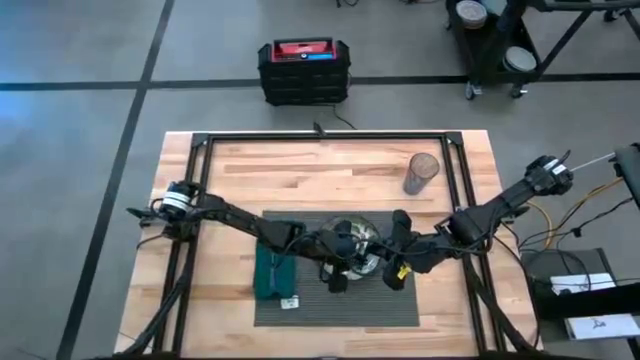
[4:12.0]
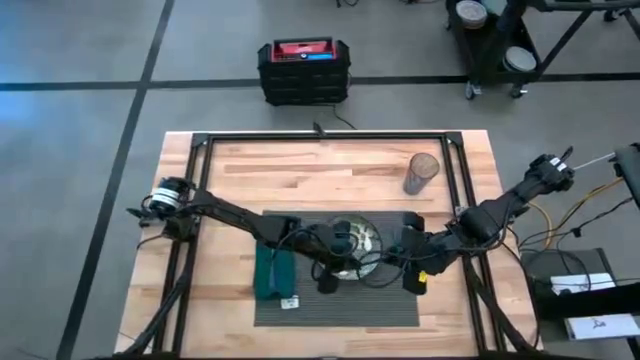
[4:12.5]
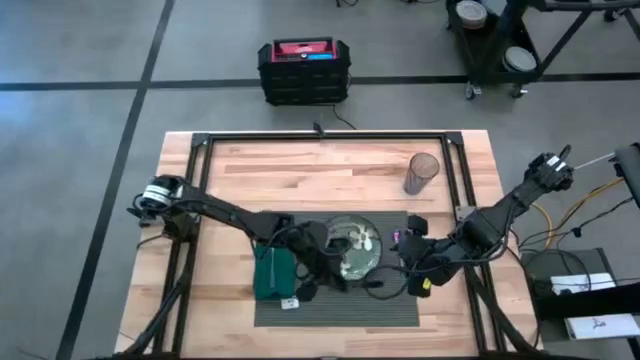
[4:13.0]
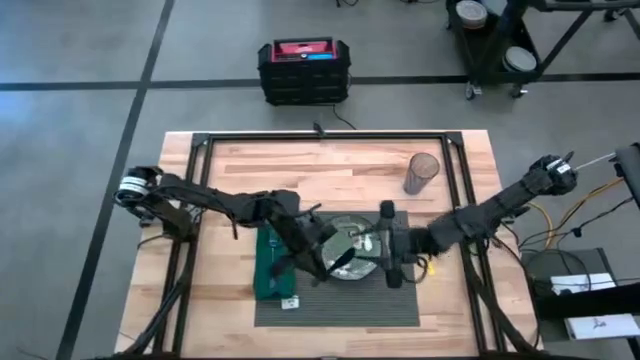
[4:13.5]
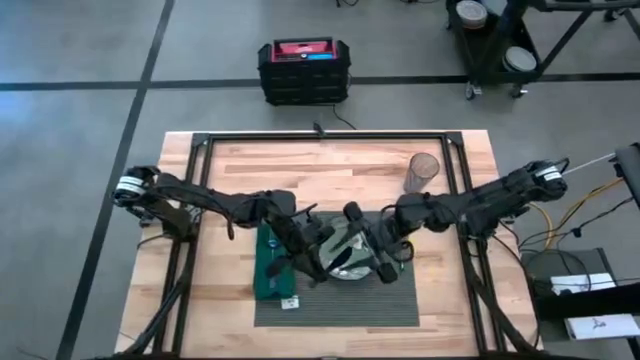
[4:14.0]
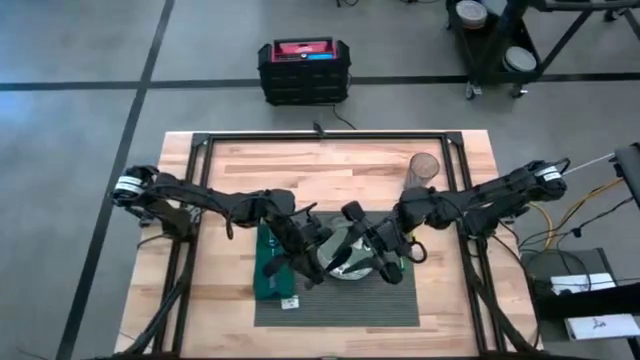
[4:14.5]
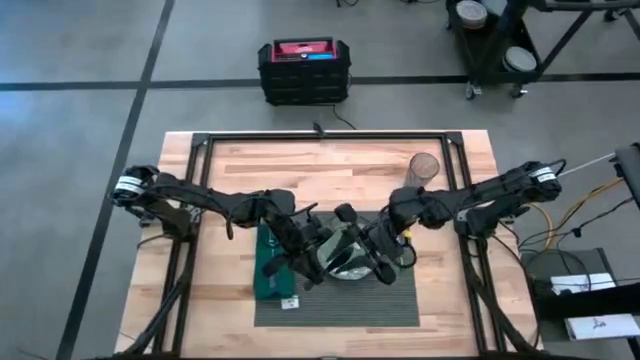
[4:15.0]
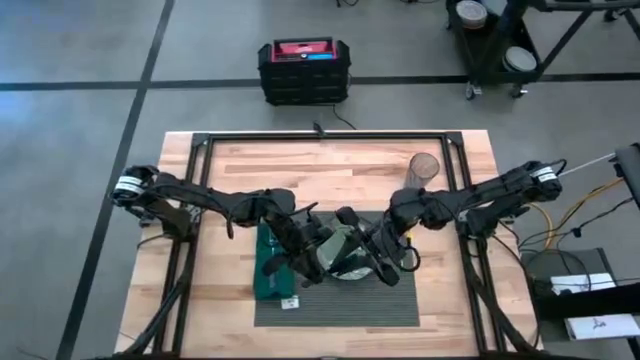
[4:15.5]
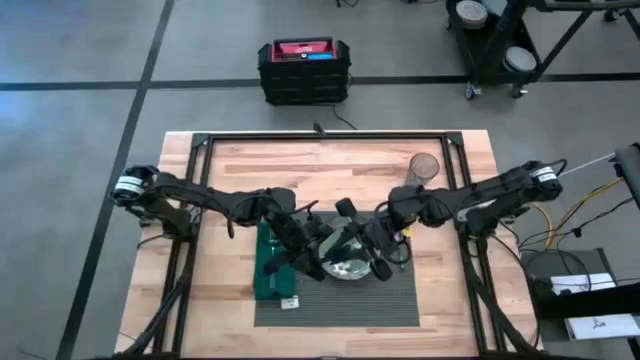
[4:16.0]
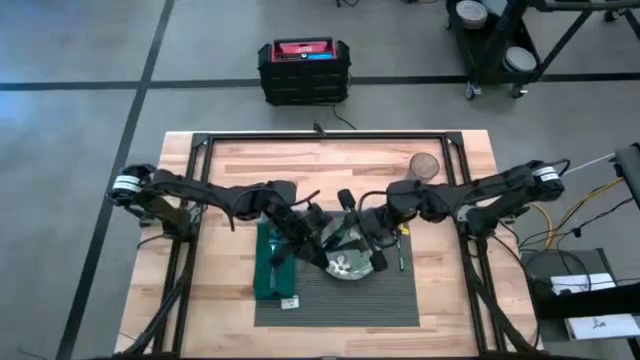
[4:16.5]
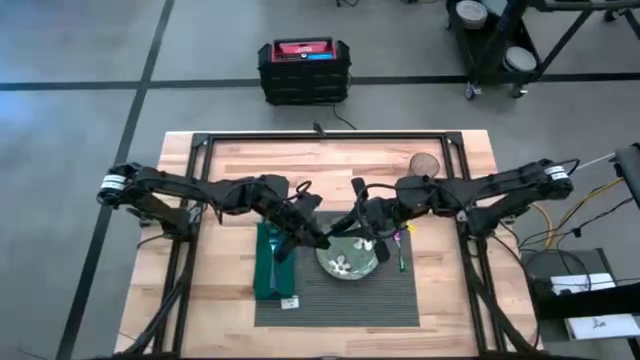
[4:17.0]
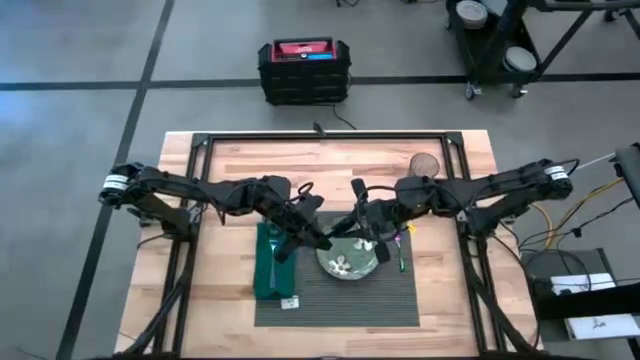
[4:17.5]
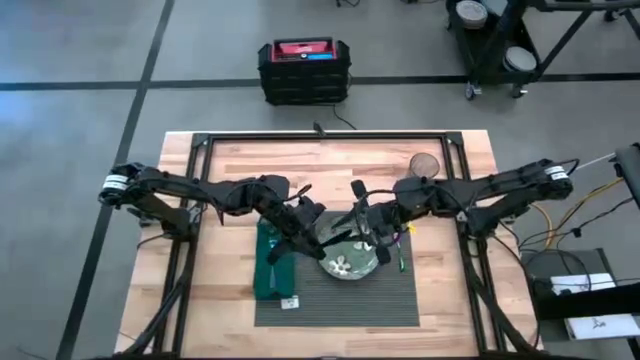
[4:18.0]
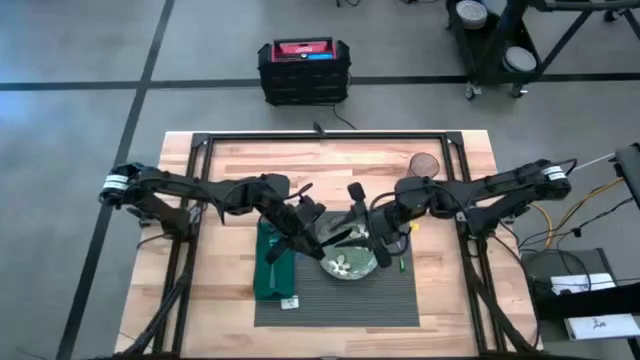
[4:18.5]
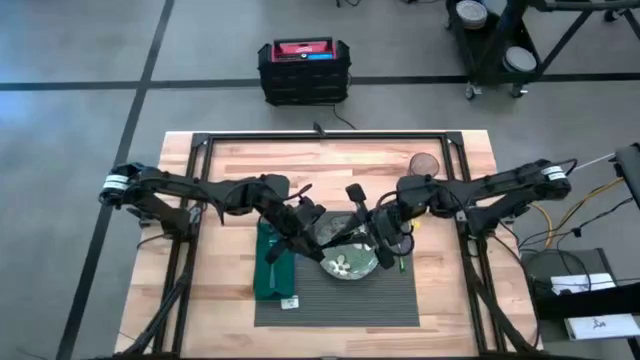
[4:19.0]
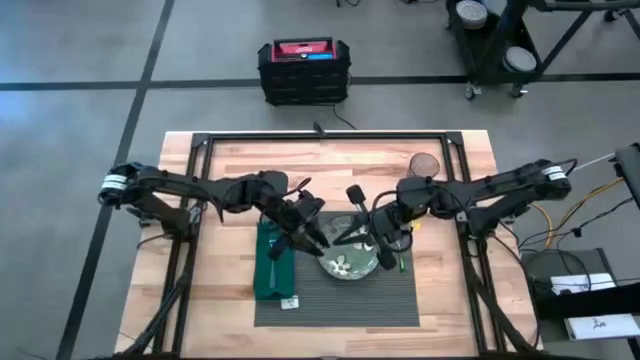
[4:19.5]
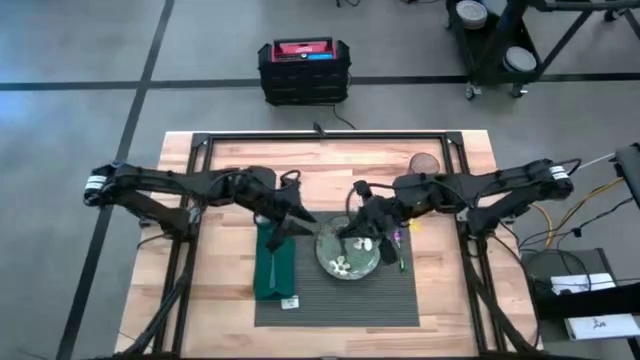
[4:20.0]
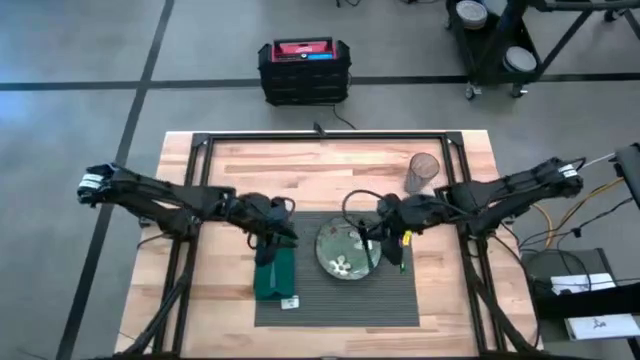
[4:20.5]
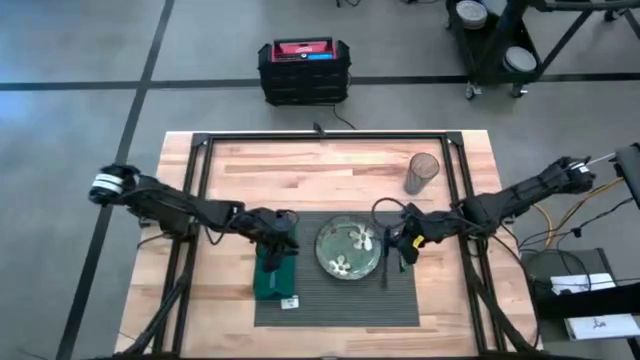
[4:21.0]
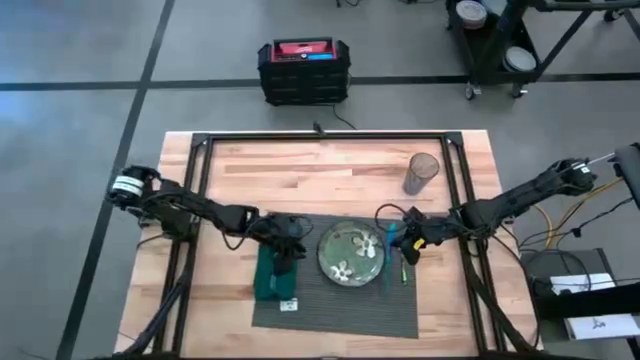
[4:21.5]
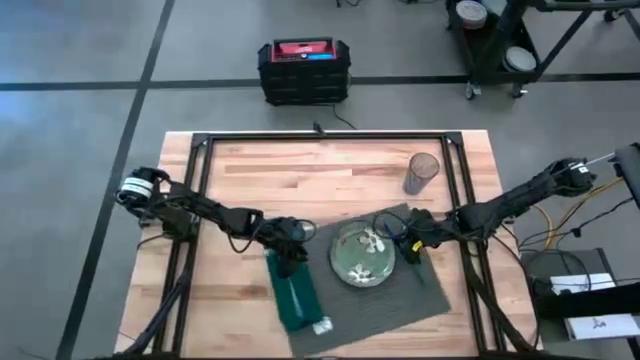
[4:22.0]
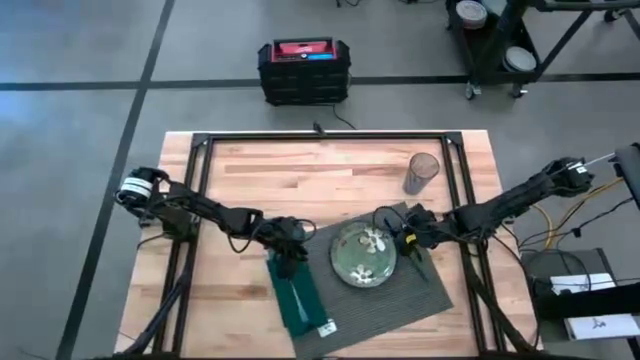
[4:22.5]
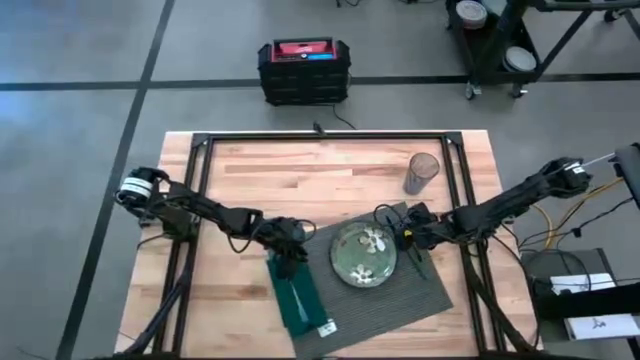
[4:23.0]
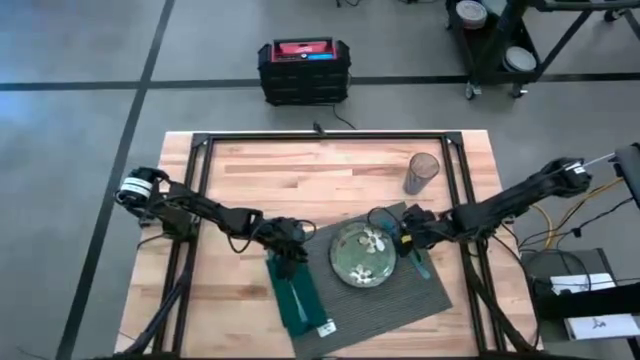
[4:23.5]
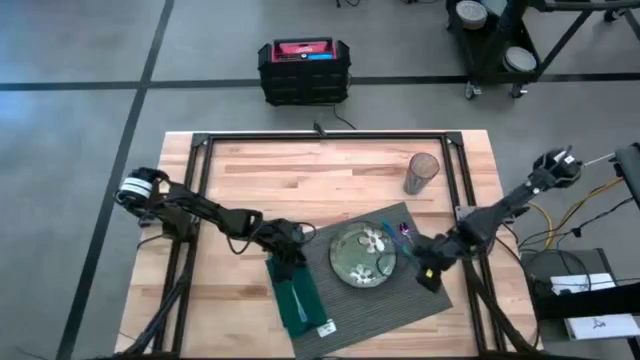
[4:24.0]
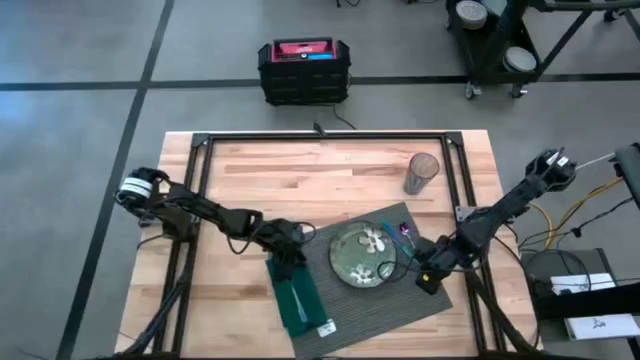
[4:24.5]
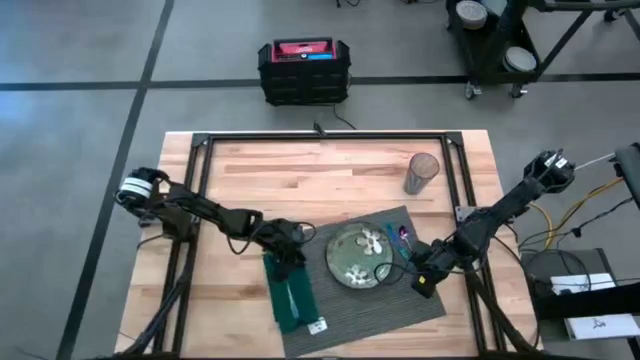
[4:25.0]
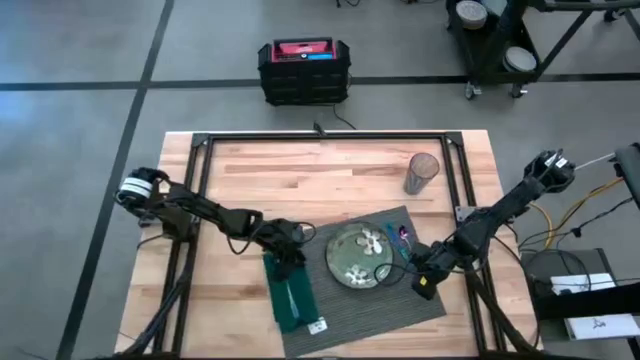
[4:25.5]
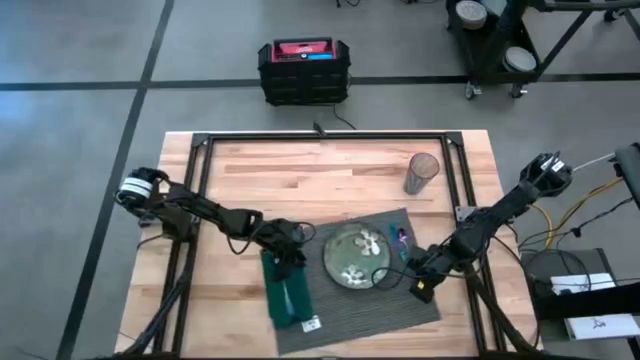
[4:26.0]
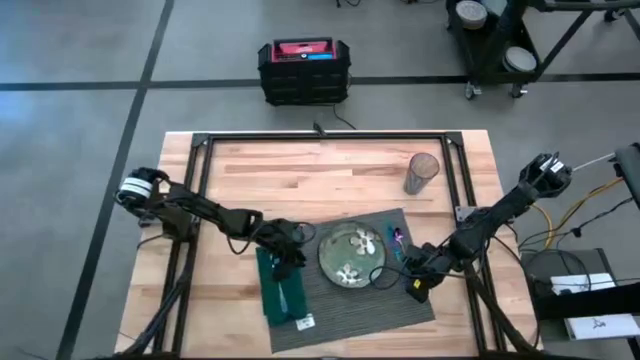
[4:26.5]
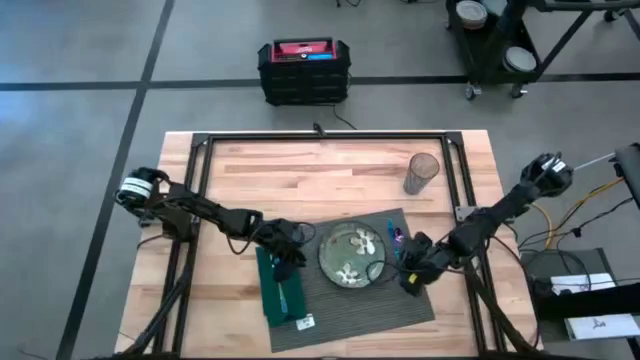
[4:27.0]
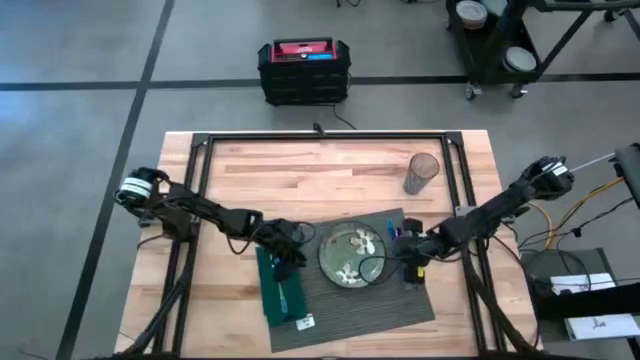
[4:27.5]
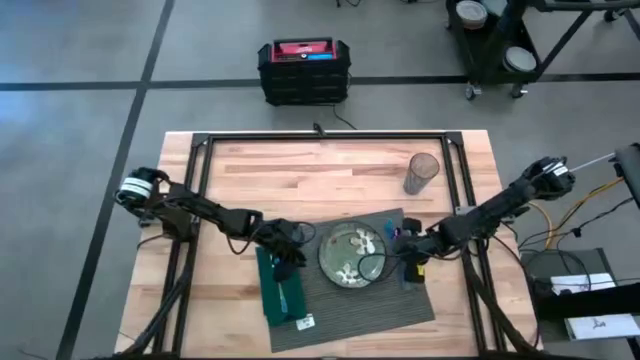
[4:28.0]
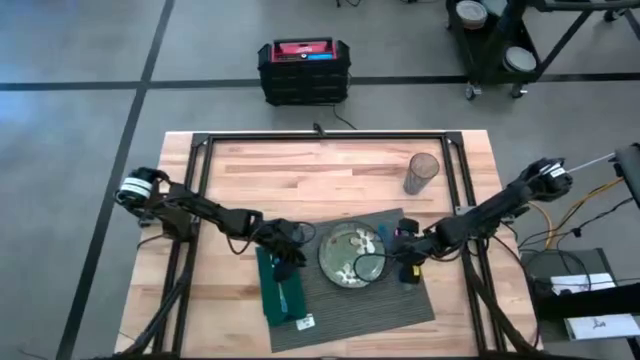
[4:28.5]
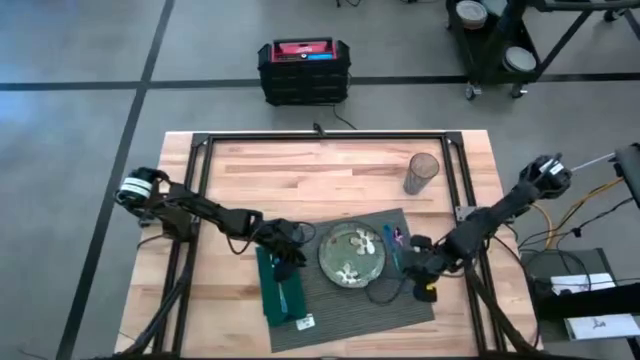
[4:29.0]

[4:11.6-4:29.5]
Task: Set table place
Put the iridescent blue knife on the gray place mat

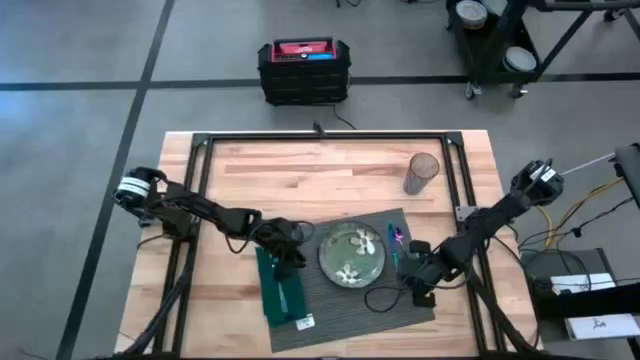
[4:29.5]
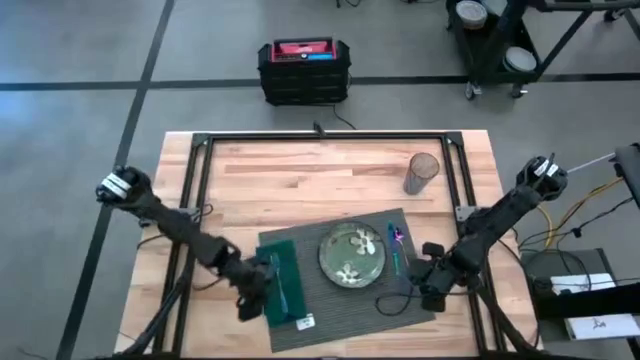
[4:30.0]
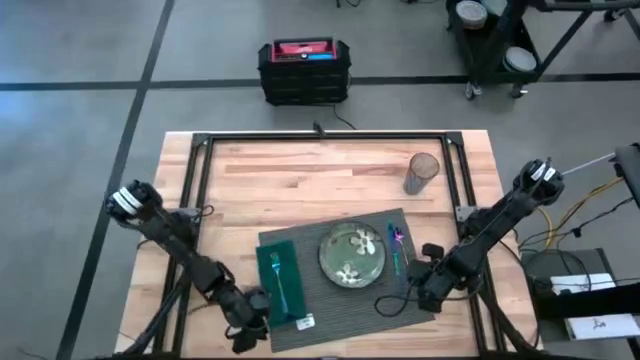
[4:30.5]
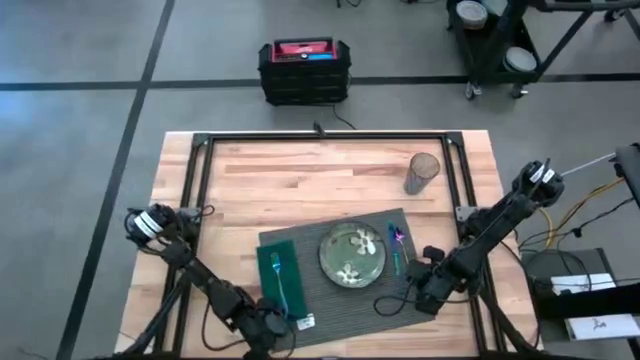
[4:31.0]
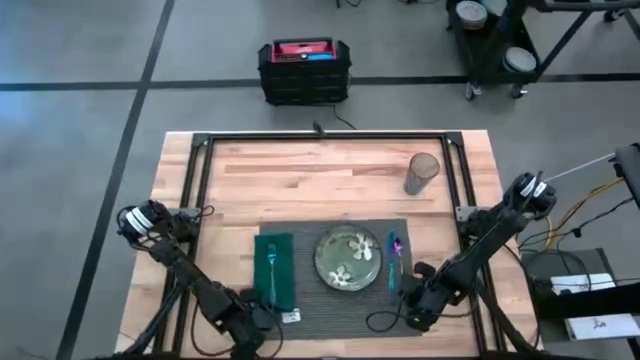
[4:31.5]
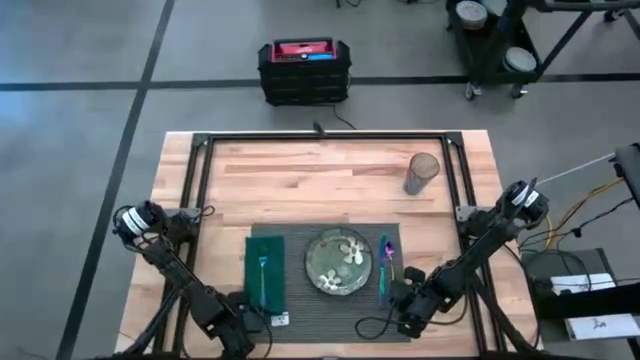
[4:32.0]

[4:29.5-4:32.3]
Adjust the gray place mat

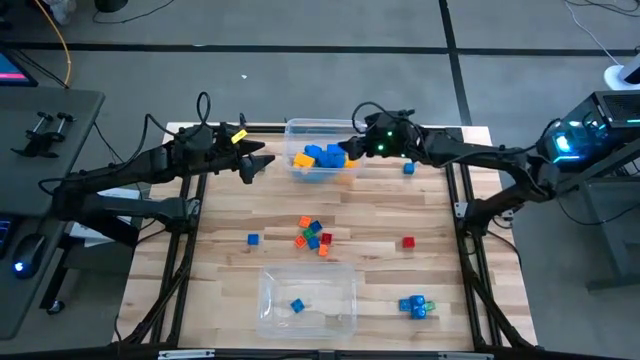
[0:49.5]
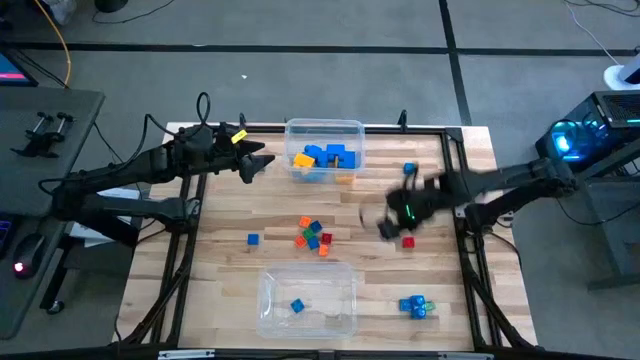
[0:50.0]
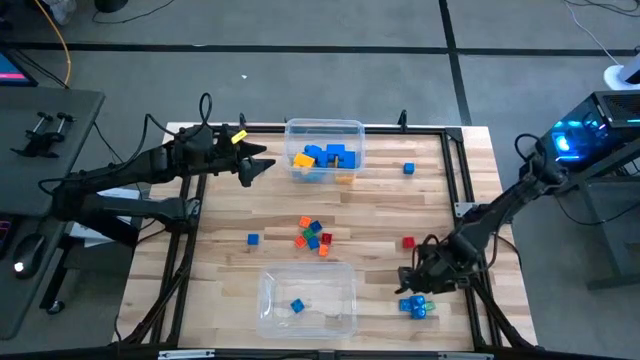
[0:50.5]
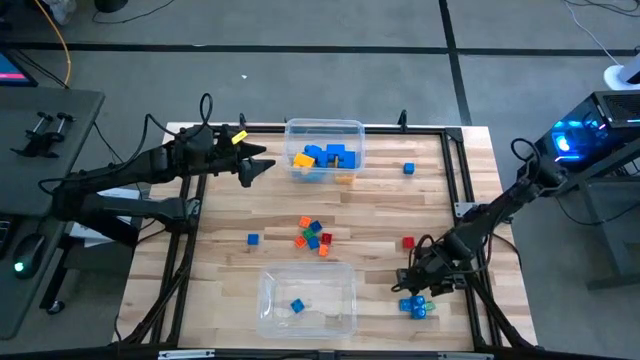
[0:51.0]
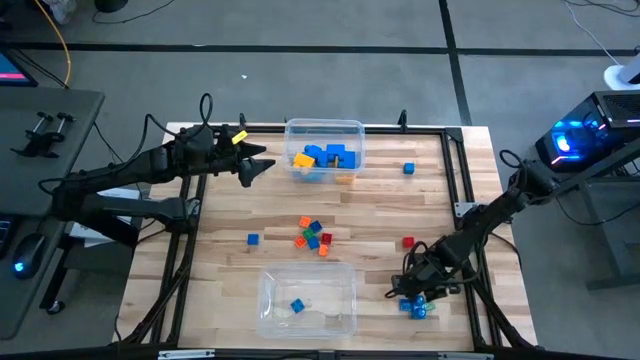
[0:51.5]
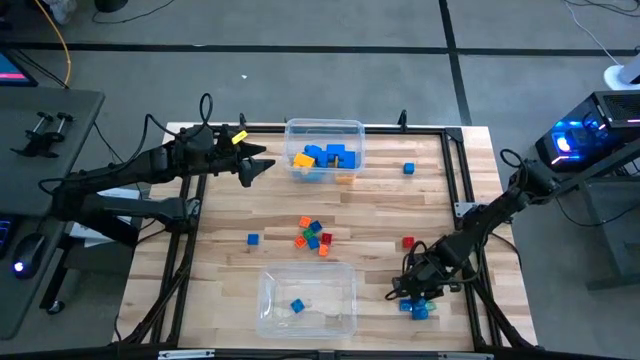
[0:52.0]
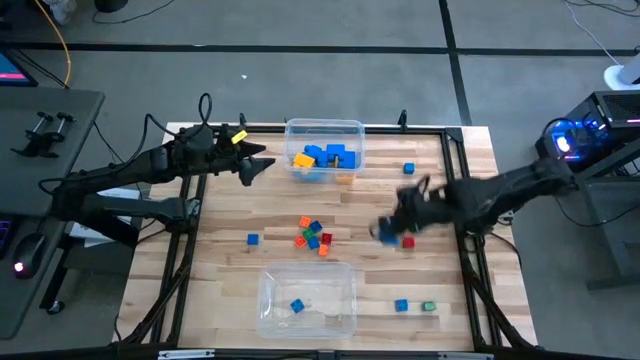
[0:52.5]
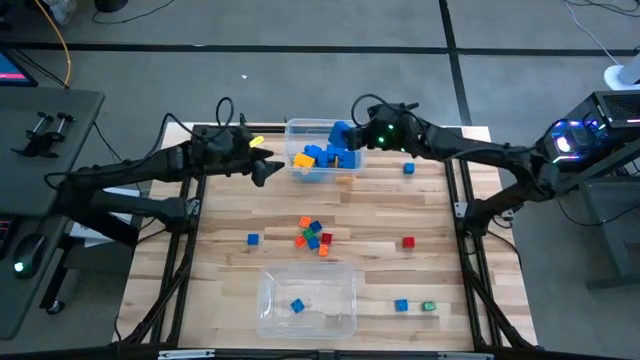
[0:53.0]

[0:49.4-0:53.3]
Task: Sort blocks by size
Put the large blue game piece into the top transparent bin
